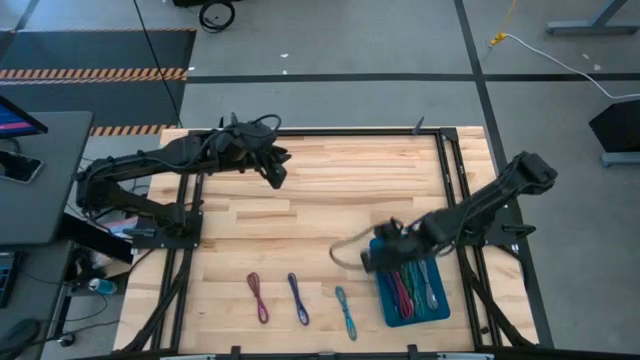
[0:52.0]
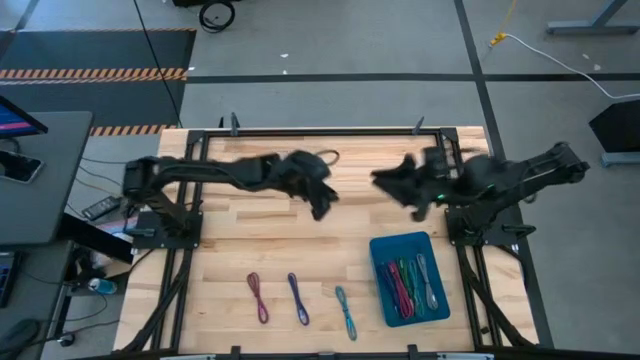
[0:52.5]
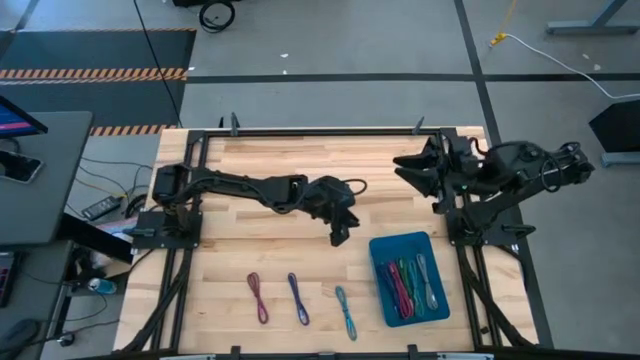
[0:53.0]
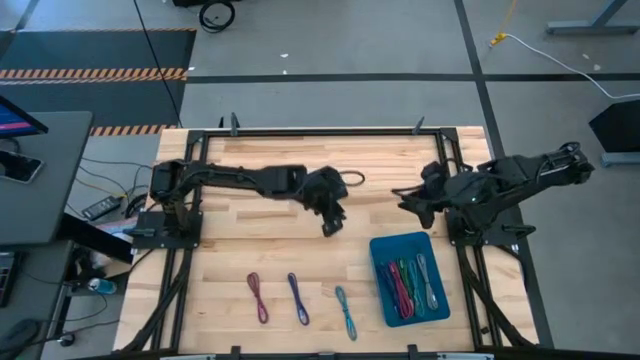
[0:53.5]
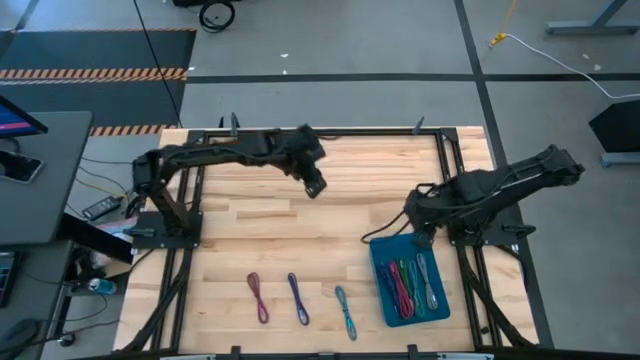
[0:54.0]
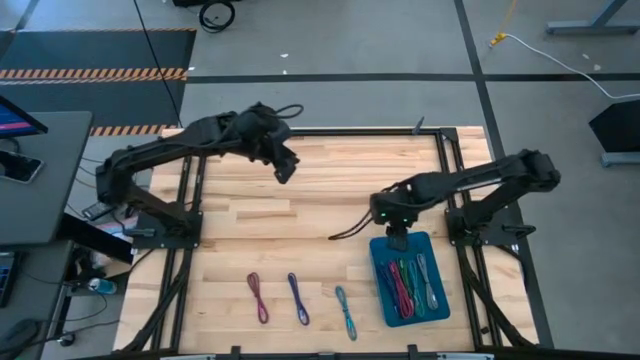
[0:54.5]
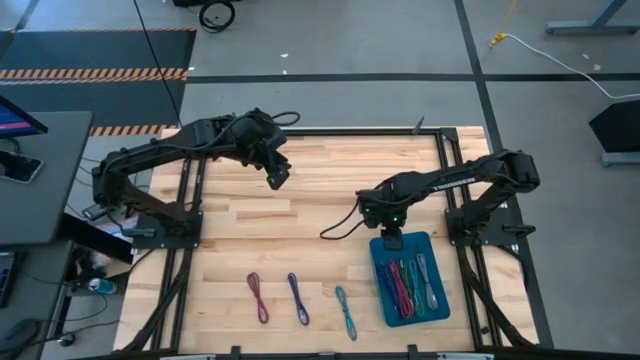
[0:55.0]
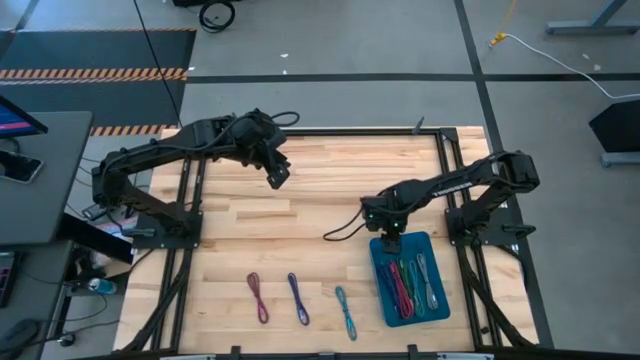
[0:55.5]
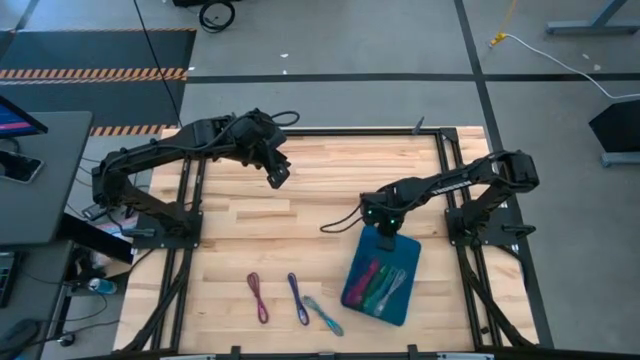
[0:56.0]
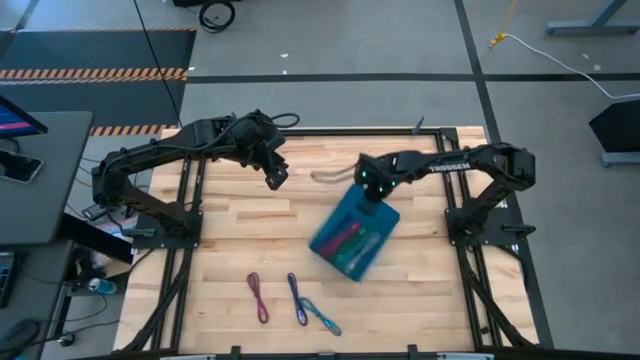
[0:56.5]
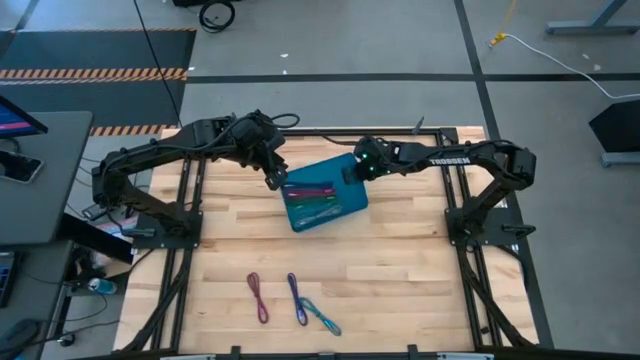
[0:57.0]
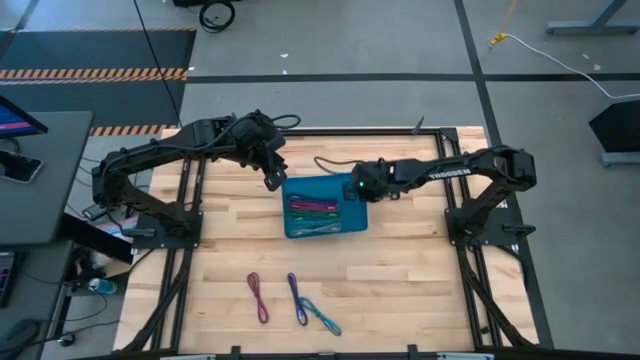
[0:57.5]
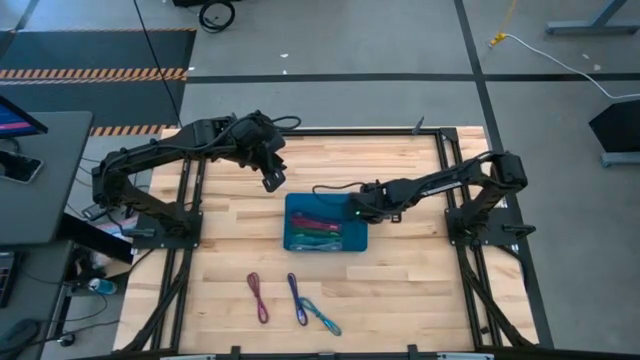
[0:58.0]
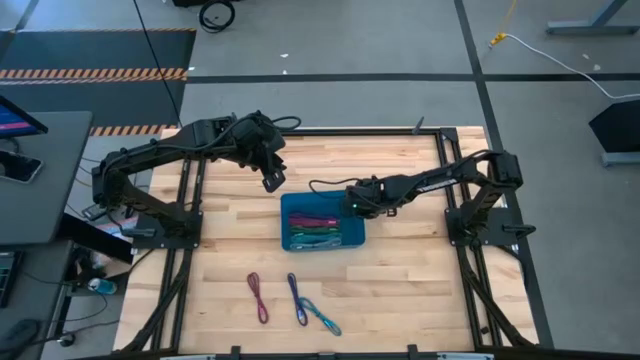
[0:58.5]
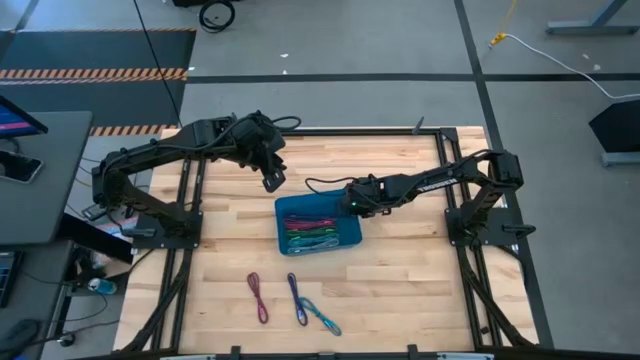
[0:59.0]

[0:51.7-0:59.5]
Task: Pick and place USB-C Cables
Move the blue bin to the center of the table

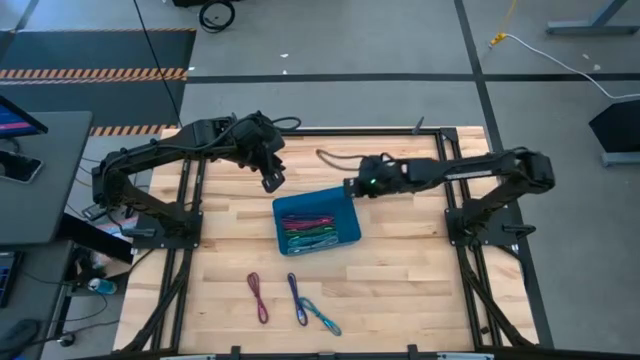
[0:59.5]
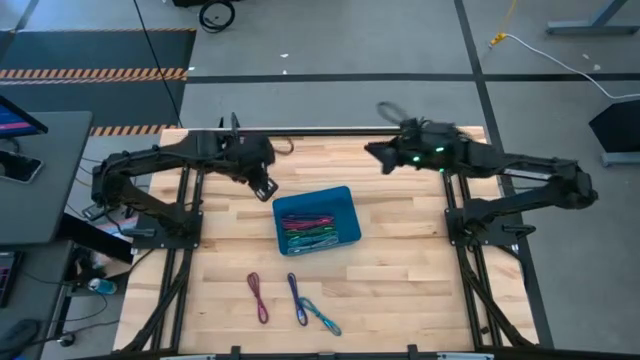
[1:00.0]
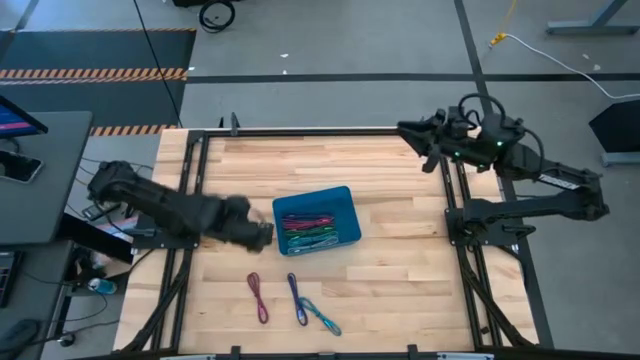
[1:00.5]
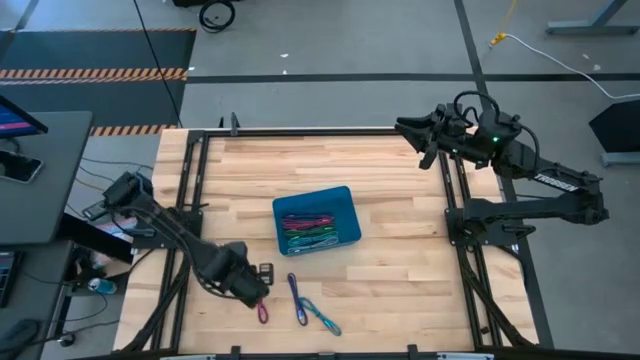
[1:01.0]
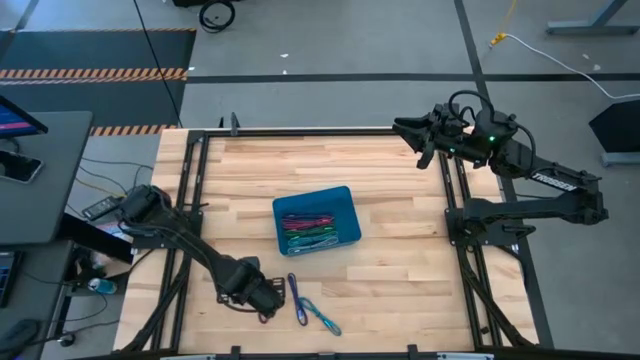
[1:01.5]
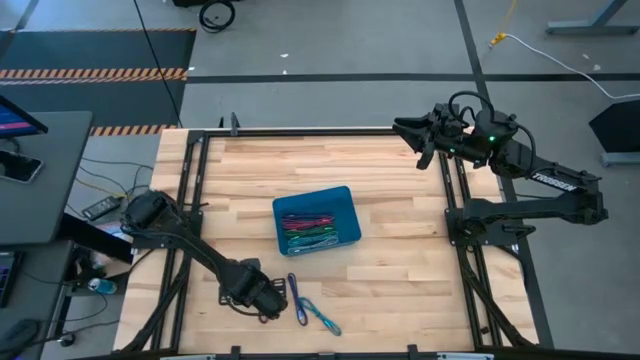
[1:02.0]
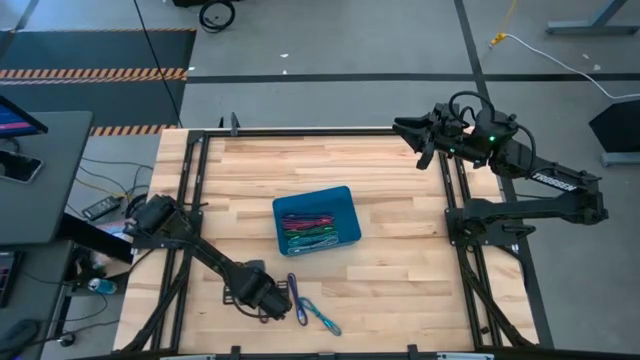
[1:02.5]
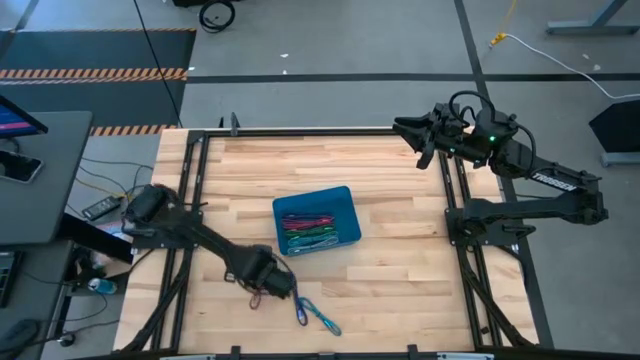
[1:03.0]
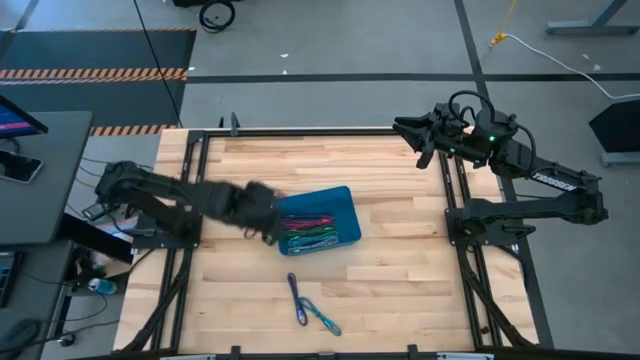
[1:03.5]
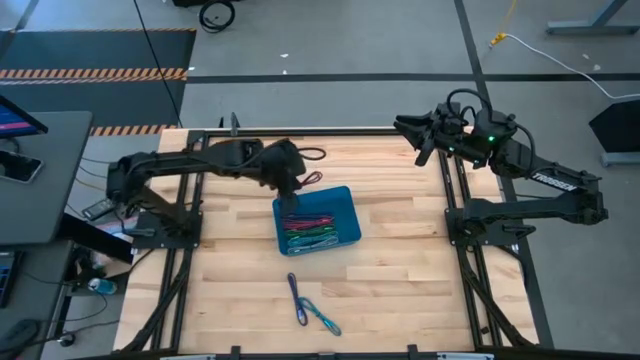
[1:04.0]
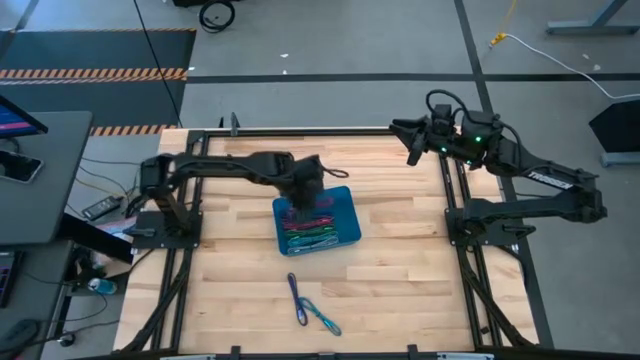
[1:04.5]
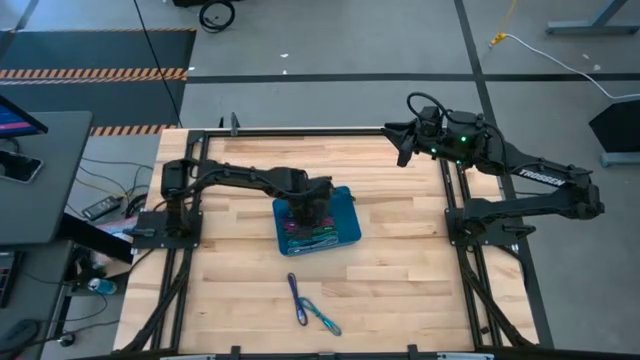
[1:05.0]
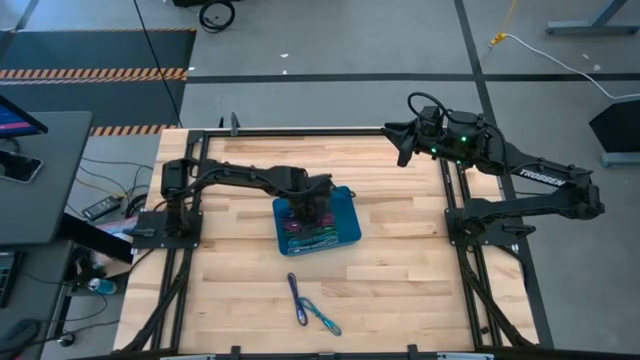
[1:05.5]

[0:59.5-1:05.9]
Put the pink charger cable into the blue bin

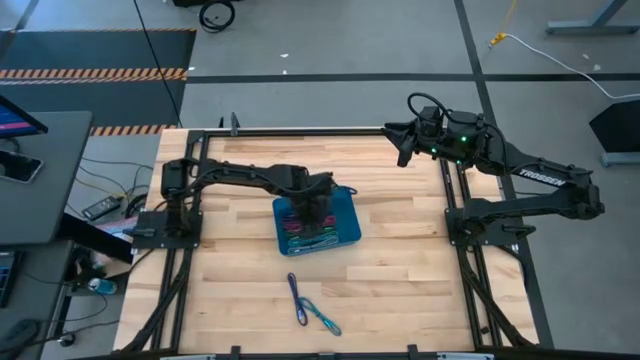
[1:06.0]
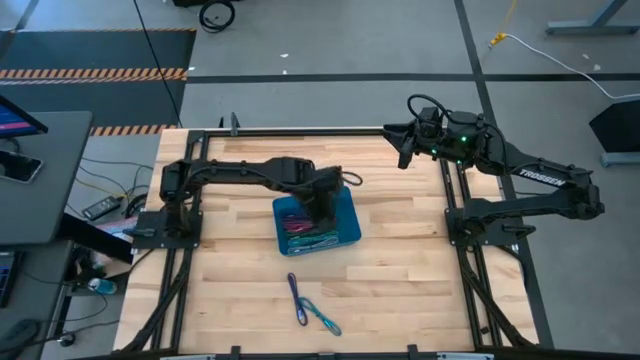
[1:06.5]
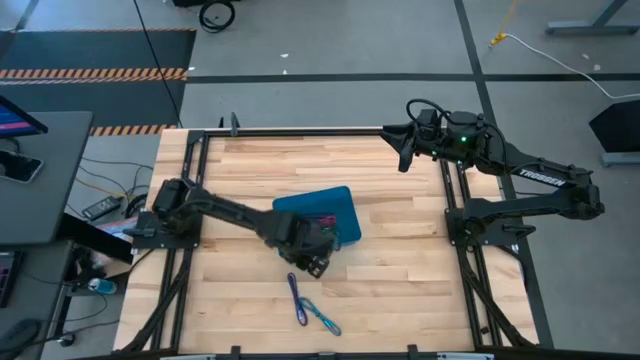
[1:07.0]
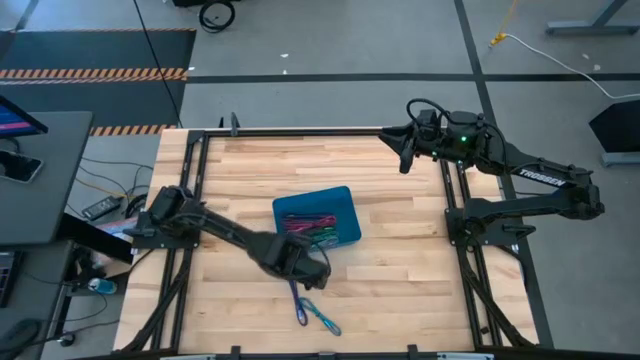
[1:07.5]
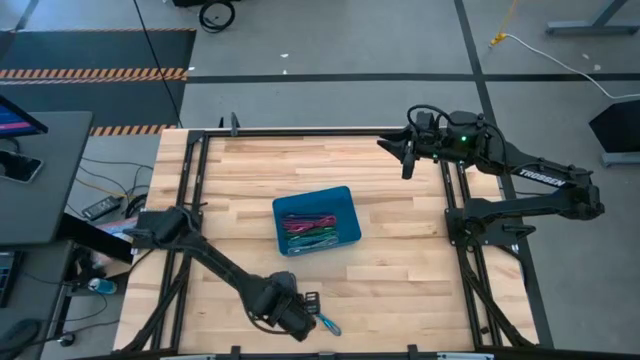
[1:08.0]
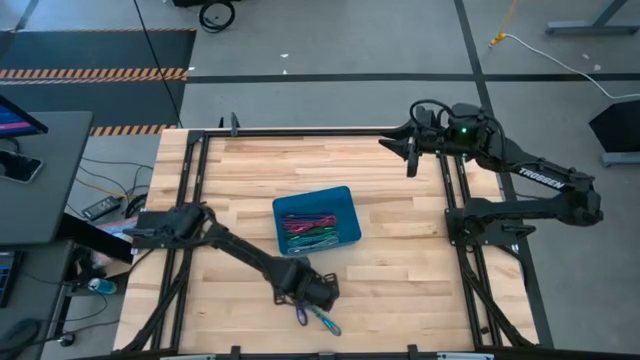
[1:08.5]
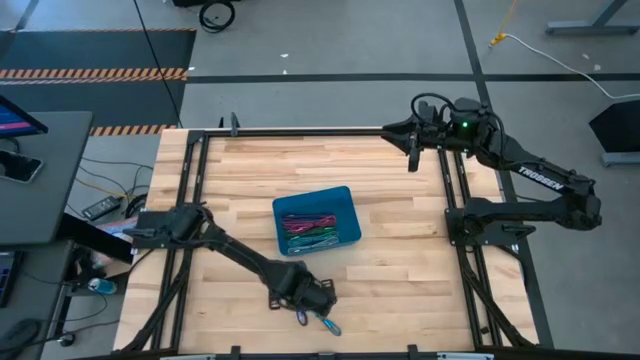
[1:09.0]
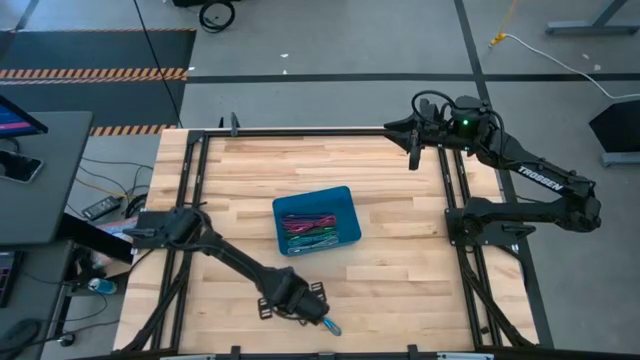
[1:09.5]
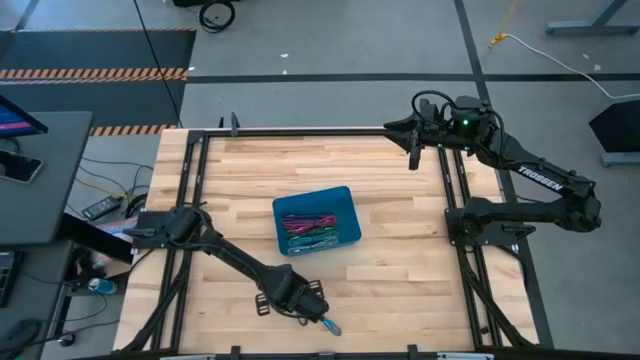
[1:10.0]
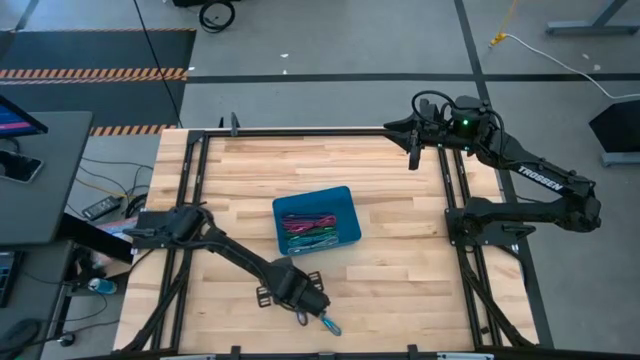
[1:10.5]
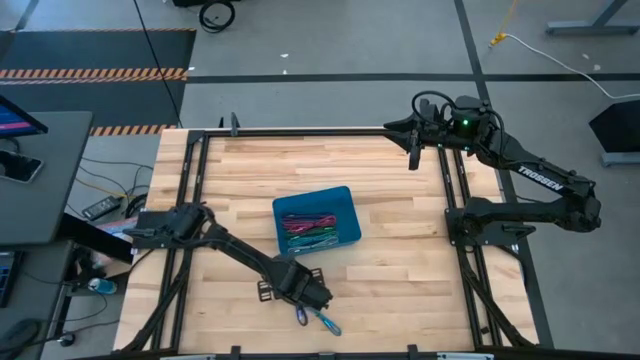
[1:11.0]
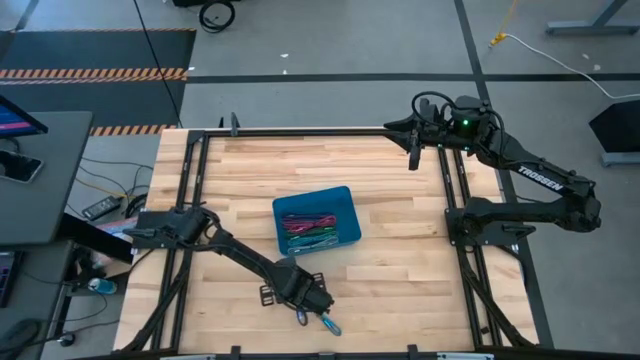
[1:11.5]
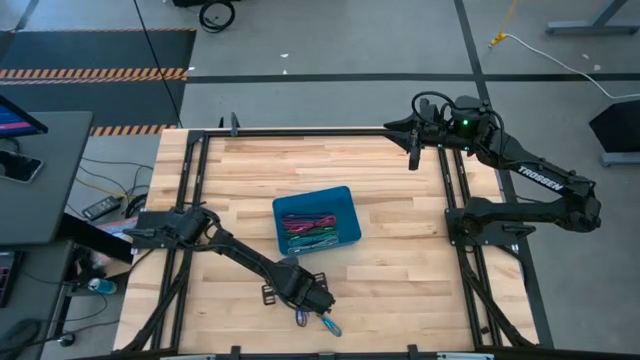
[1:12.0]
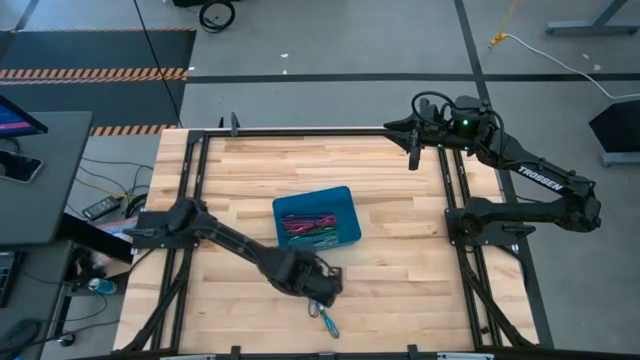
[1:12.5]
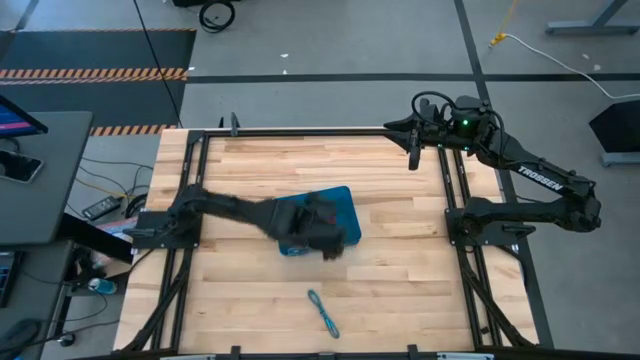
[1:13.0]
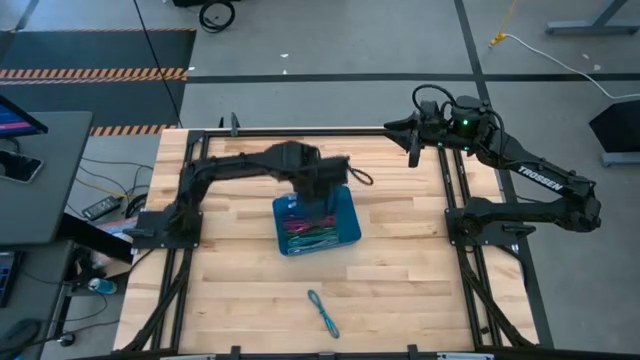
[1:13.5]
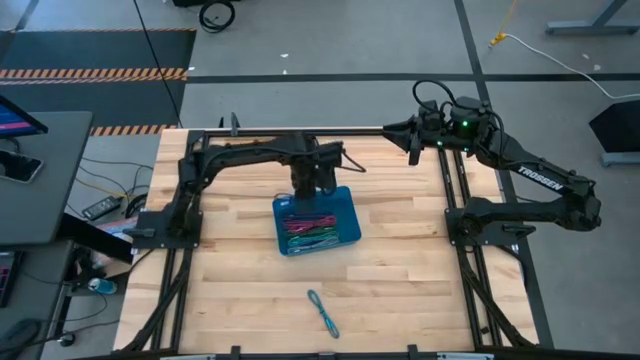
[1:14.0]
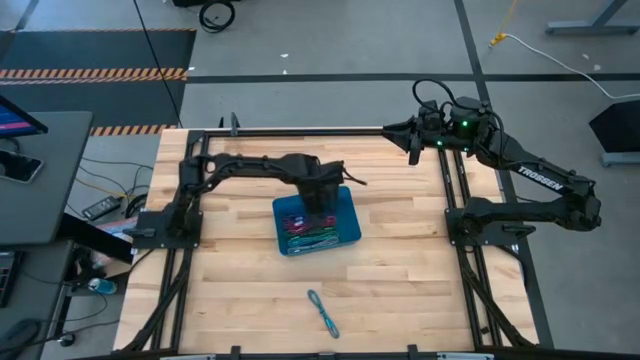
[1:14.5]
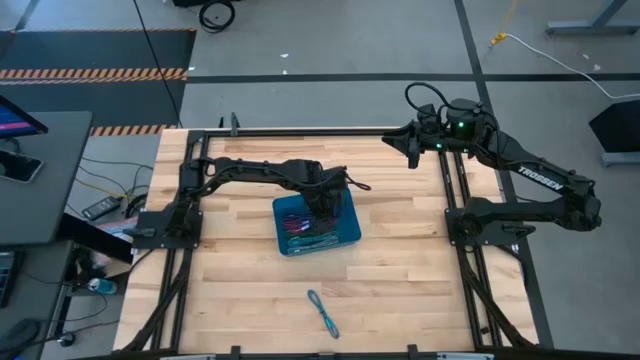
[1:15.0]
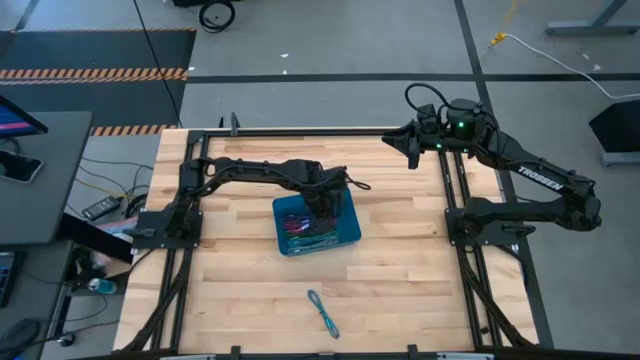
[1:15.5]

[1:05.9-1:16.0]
Put the violet charger cable into the blue bin
